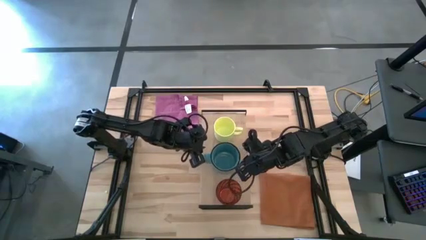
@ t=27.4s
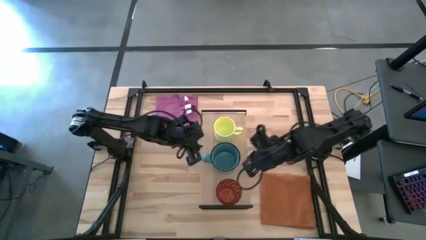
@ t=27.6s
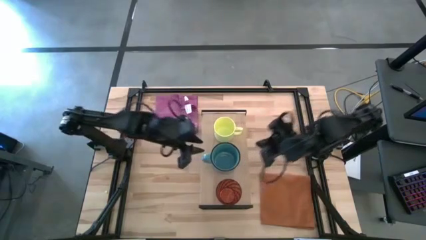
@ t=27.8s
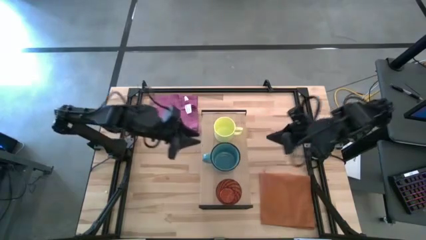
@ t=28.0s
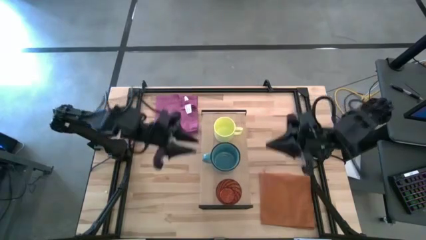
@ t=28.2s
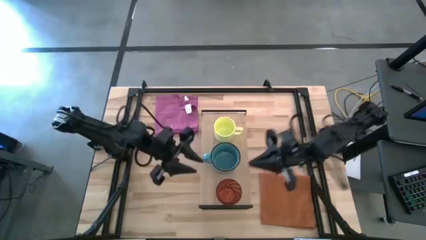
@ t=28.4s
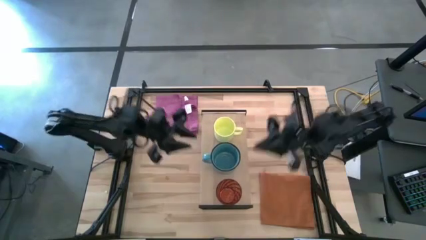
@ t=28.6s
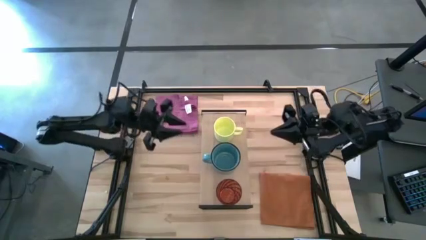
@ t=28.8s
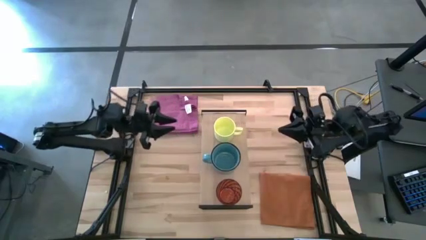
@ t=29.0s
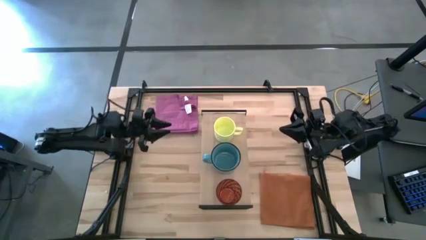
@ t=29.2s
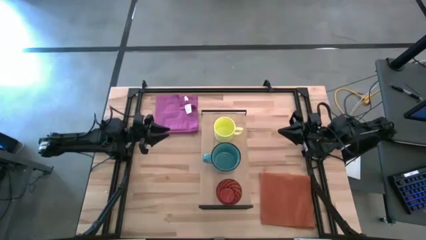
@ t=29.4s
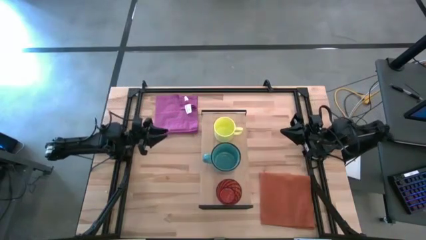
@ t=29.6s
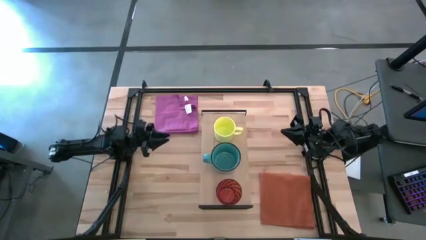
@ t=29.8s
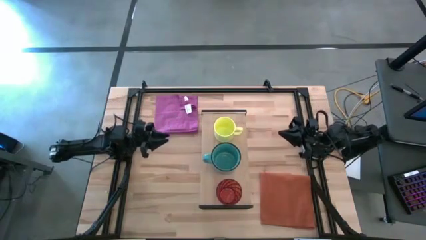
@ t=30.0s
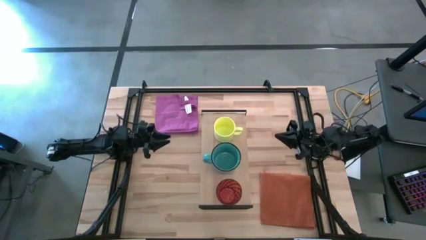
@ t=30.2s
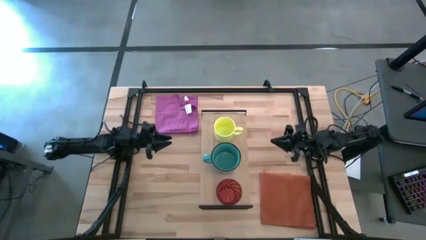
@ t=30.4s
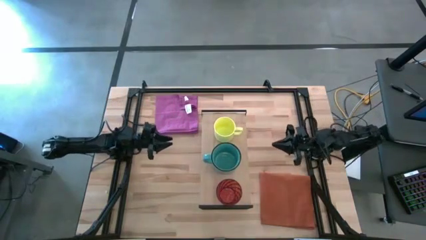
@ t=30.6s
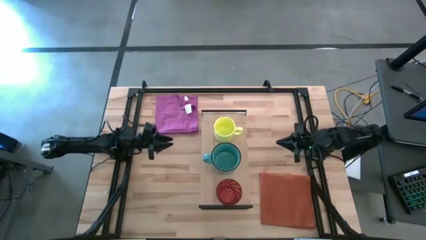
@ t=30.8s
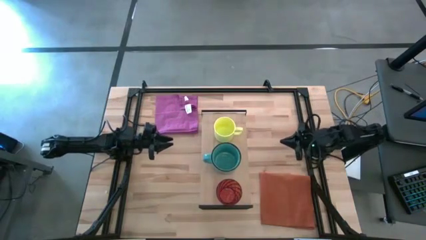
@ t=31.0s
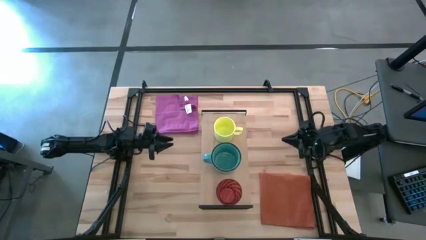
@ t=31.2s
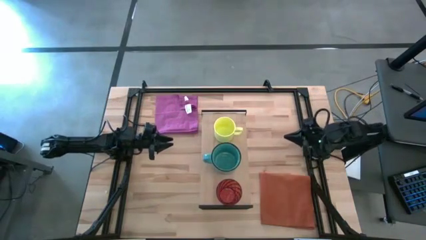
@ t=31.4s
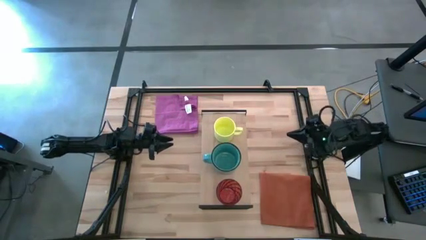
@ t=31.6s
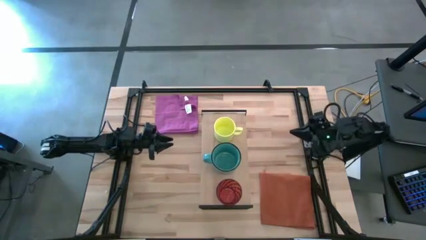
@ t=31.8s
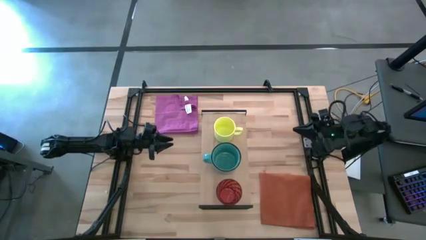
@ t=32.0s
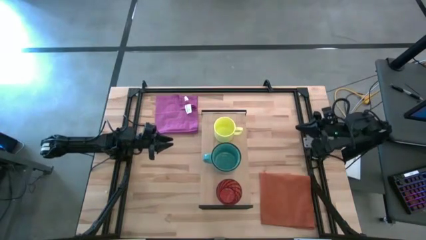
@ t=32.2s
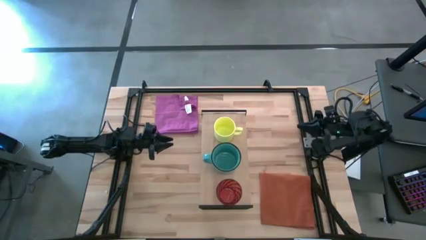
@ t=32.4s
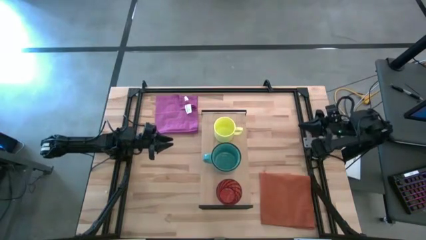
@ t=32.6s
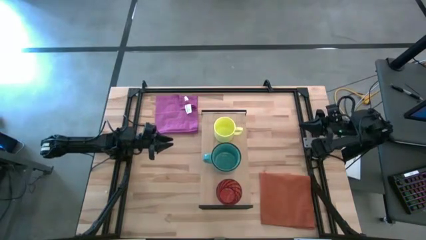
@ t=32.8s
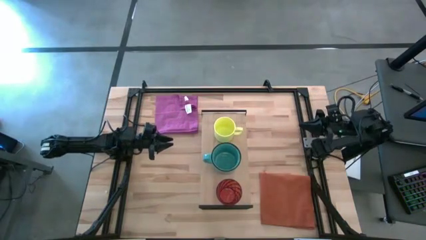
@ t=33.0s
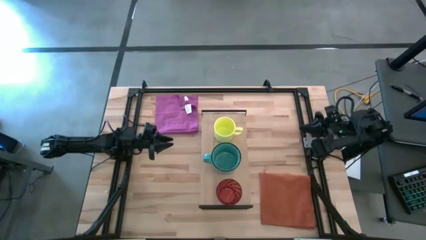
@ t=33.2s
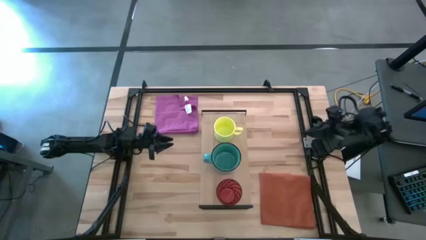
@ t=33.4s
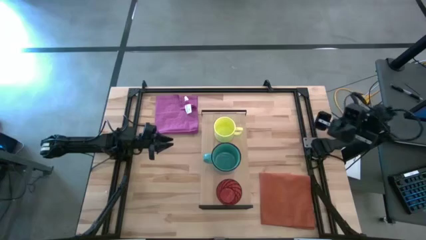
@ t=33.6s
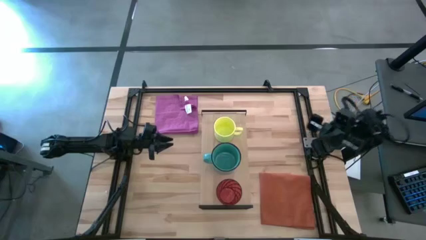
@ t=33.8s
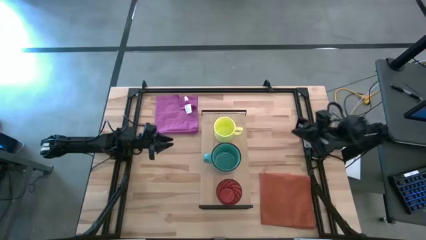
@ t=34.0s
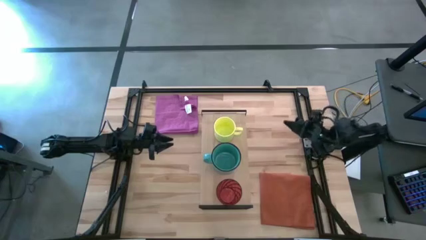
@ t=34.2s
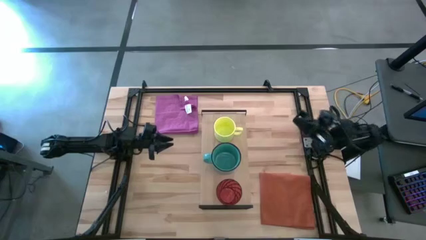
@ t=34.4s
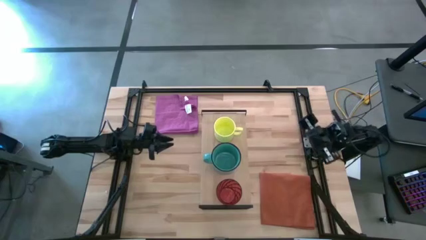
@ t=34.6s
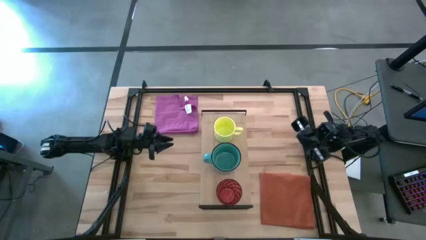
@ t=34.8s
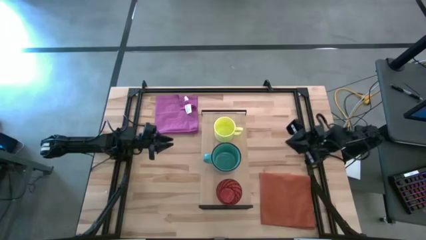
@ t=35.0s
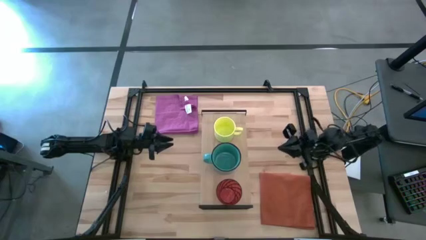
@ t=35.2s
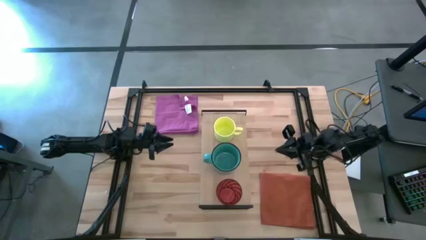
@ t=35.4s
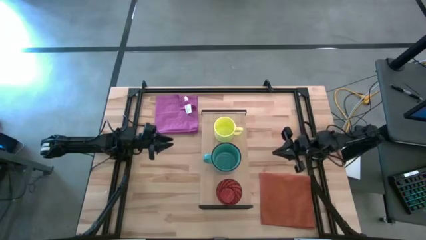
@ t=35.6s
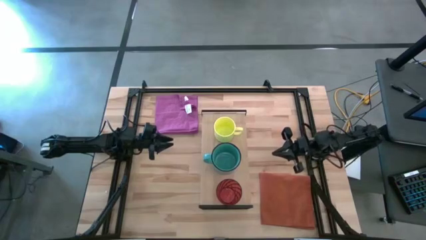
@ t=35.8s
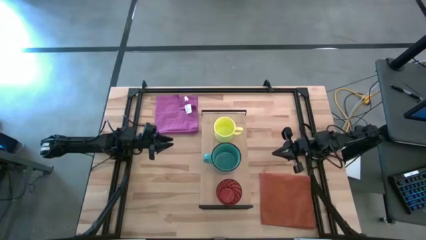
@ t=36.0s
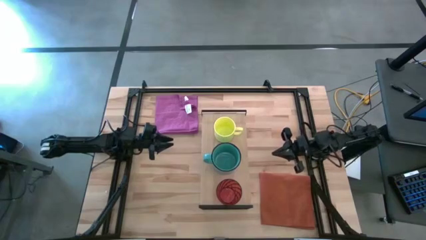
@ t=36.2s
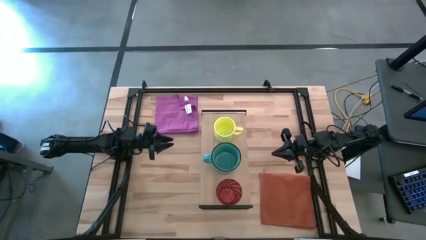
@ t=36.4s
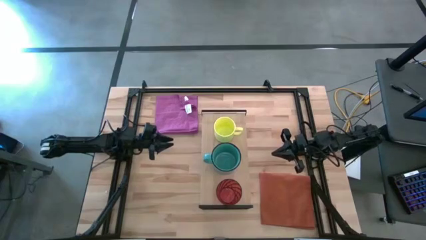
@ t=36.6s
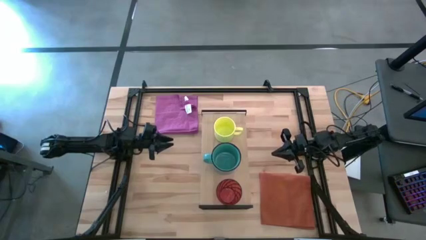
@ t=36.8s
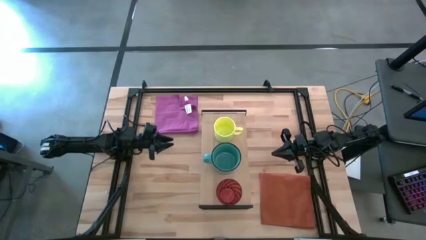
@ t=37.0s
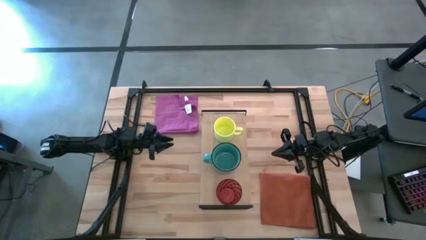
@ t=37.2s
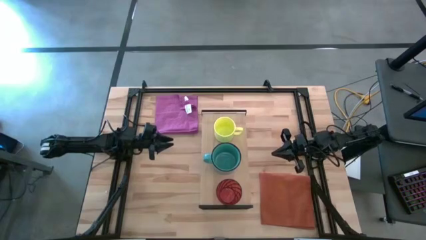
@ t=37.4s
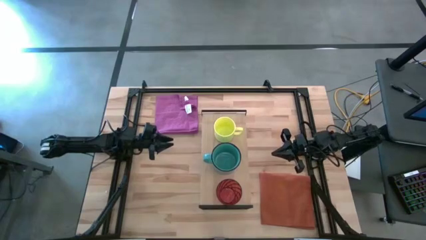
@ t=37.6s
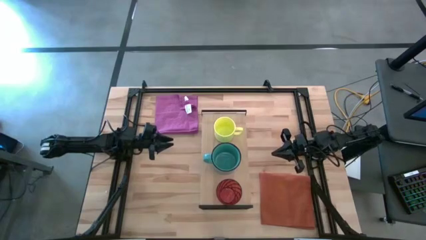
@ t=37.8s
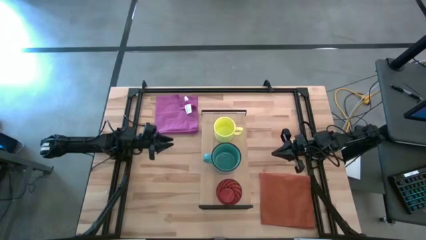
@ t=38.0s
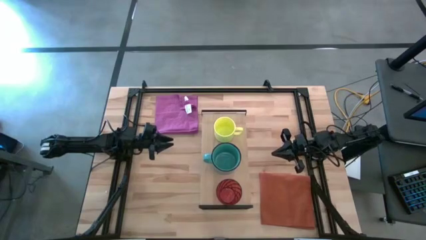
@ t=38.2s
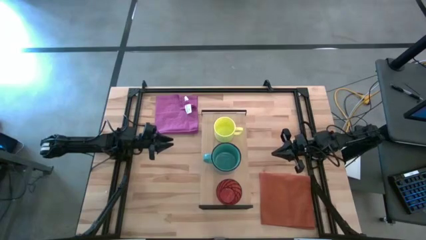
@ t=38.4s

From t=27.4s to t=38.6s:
Task: Stack small to large cups/mugs on shelf
Return to Home Position

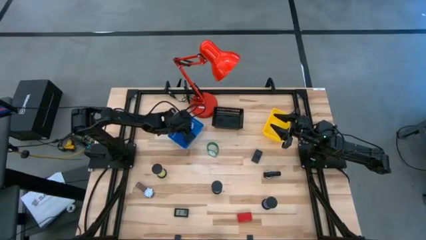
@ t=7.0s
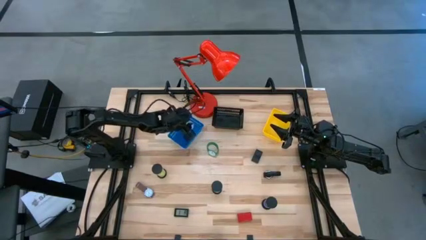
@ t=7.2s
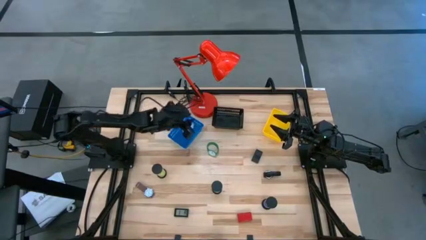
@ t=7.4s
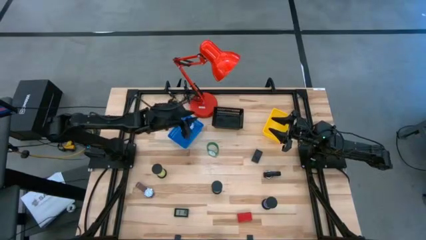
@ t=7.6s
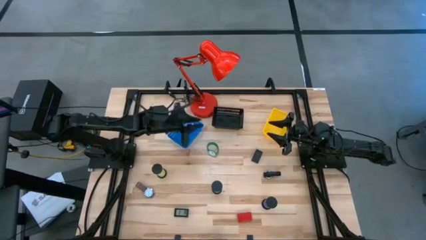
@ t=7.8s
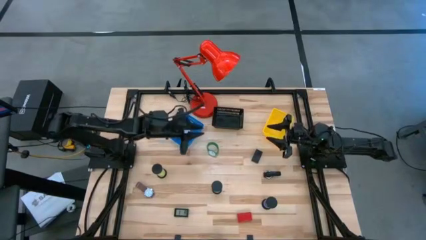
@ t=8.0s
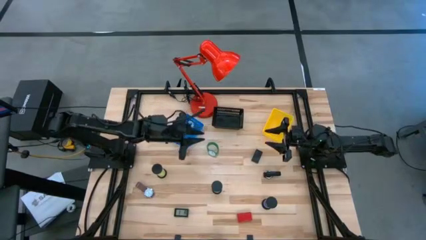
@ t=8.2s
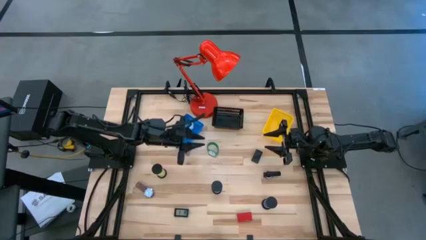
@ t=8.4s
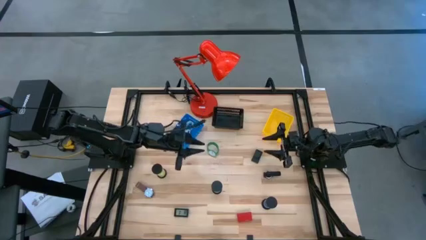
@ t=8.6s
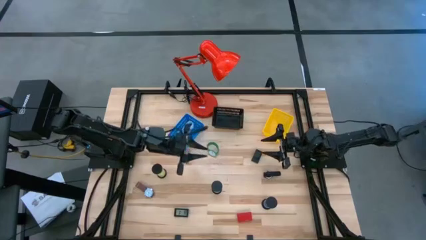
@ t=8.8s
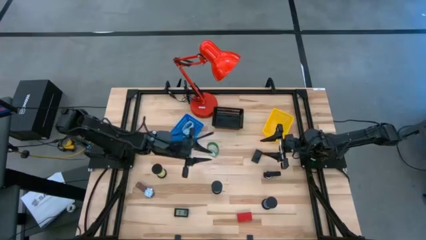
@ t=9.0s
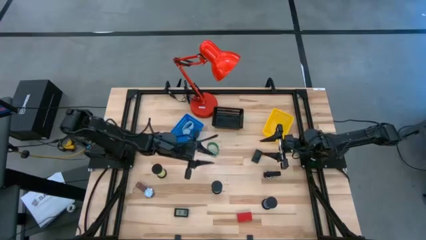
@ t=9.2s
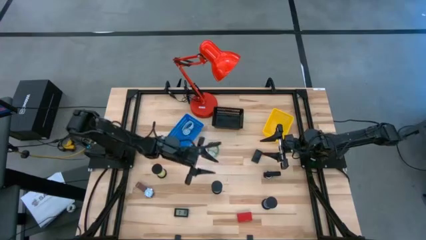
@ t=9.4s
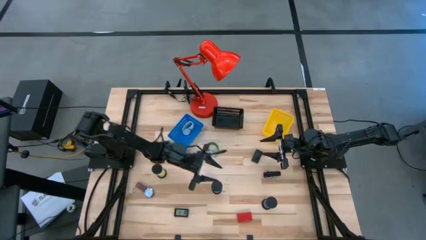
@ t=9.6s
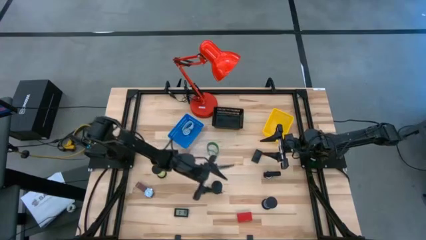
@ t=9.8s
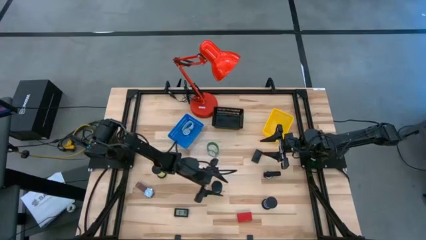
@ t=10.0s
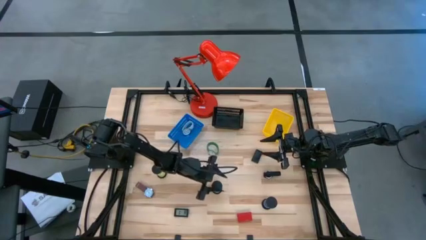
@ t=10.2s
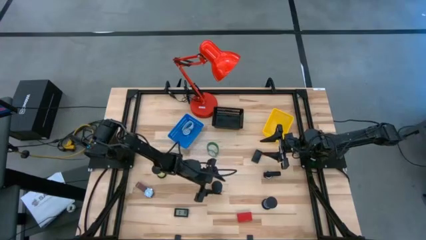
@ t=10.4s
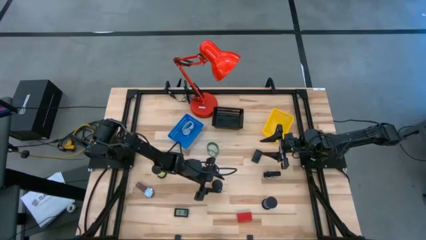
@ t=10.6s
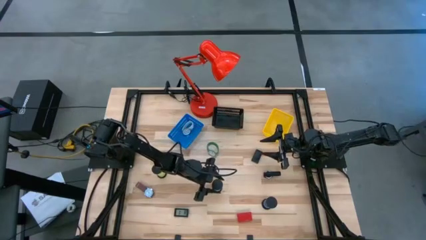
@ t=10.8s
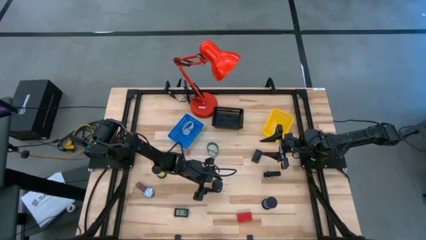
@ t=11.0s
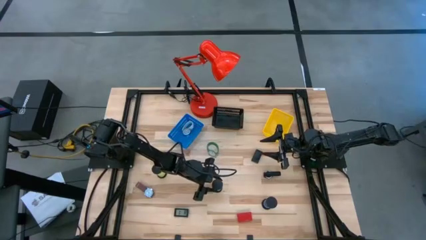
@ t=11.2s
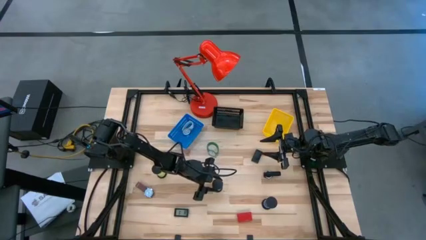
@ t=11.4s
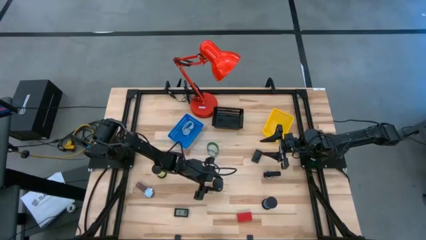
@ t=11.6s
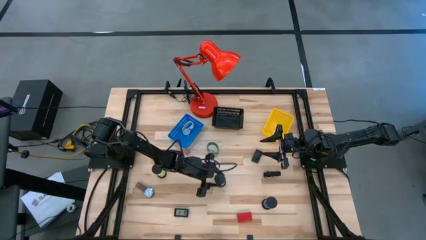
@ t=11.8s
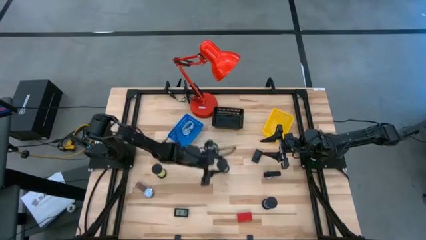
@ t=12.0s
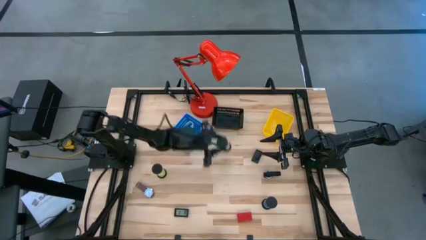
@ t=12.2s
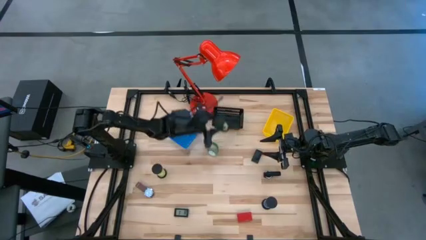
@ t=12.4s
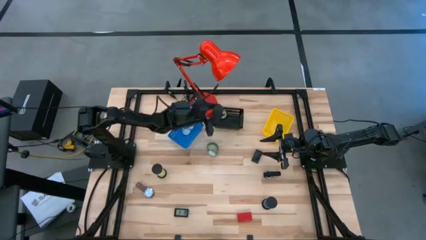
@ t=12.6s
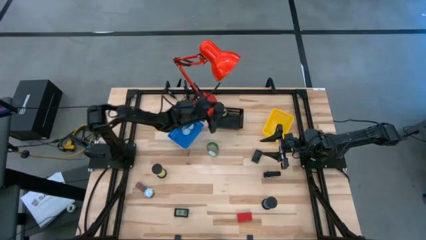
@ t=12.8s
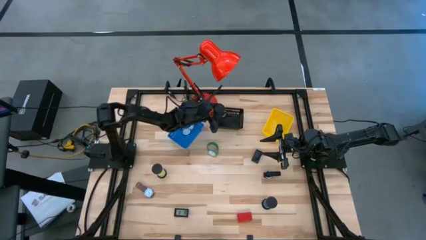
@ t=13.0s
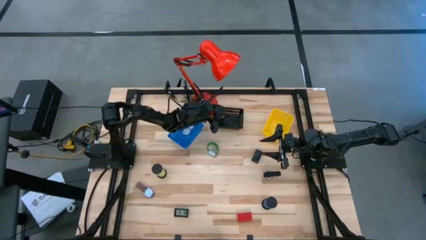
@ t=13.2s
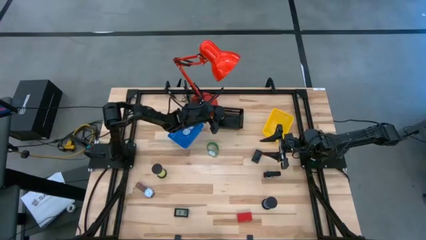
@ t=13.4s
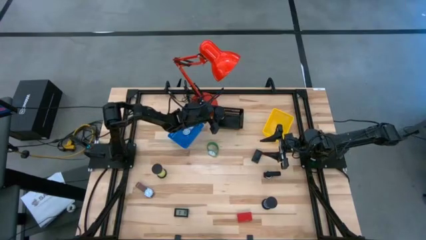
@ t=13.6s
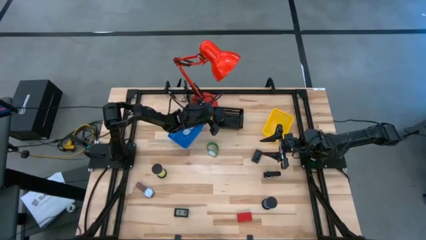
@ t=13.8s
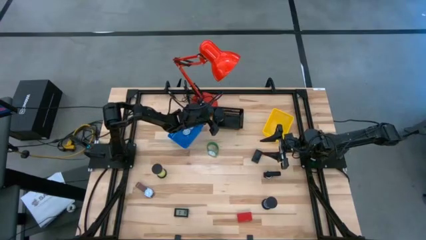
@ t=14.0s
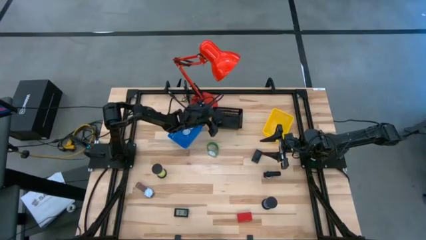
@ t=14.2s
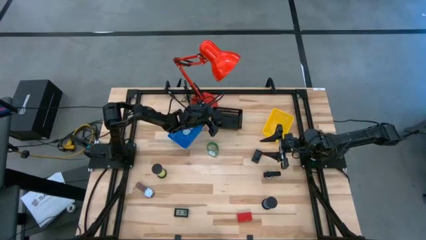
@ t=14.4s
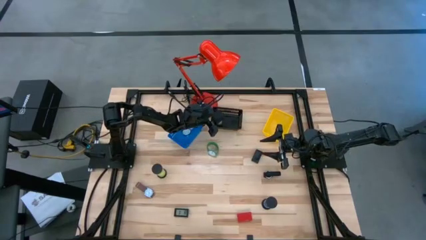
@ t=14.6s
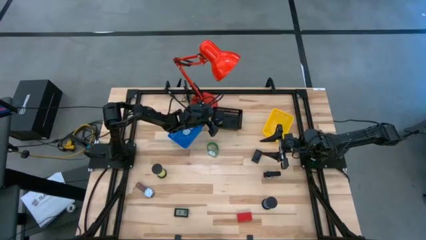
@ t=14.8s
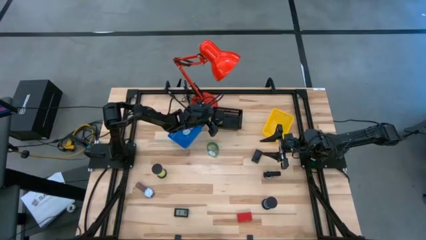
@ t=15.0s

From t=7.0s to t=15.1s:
Task: Pick & Place Office items
Put the right yellow hourglass into the black bin
